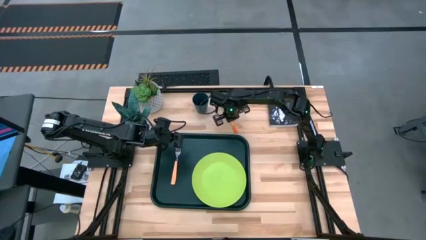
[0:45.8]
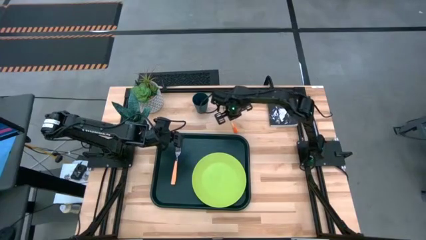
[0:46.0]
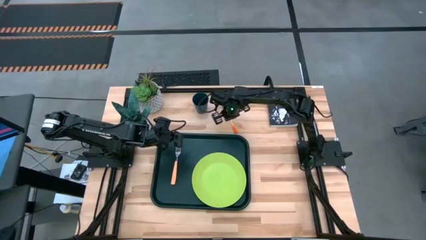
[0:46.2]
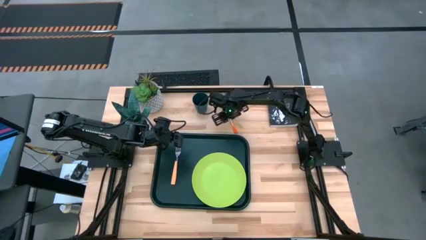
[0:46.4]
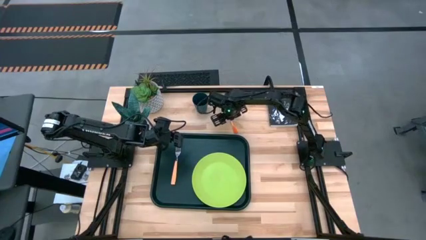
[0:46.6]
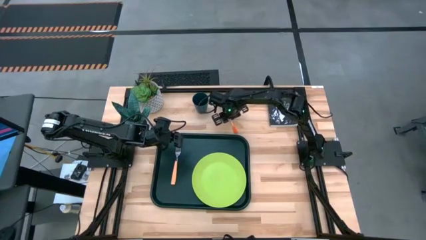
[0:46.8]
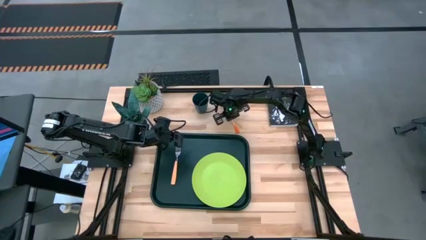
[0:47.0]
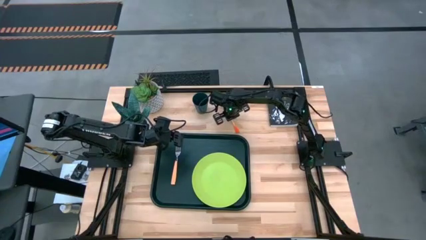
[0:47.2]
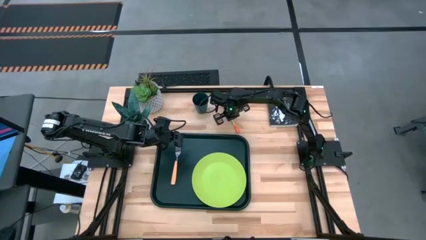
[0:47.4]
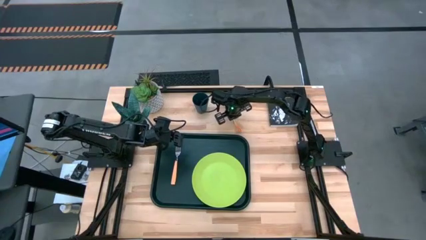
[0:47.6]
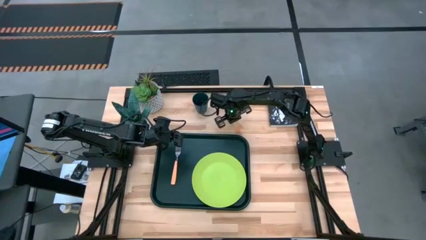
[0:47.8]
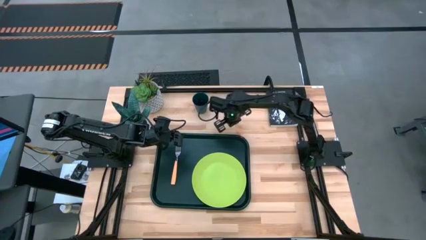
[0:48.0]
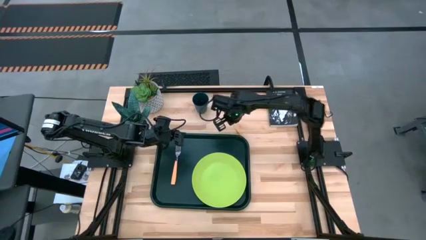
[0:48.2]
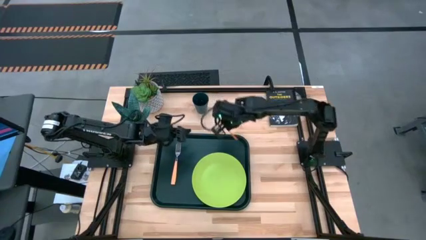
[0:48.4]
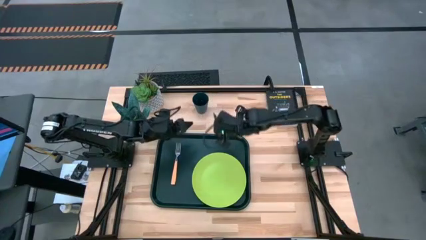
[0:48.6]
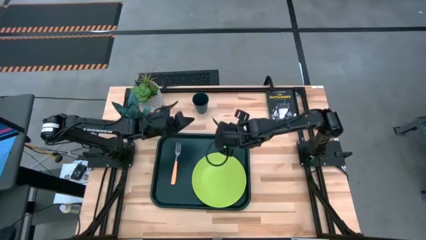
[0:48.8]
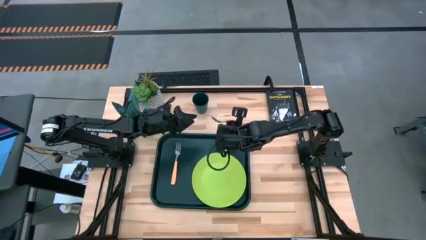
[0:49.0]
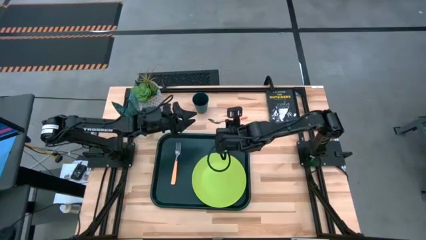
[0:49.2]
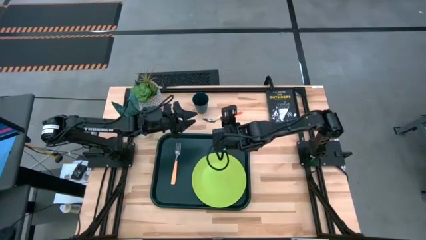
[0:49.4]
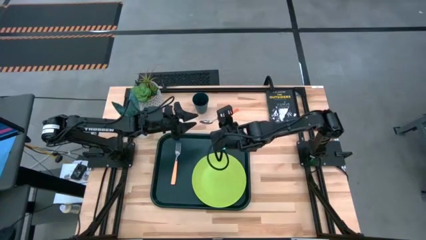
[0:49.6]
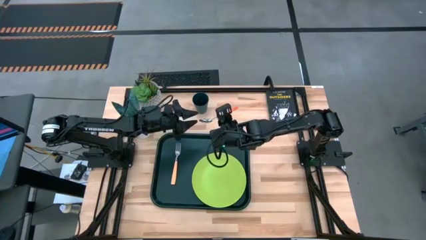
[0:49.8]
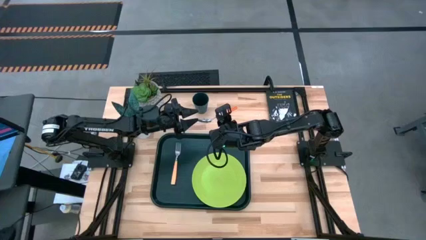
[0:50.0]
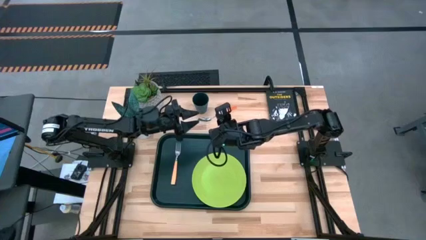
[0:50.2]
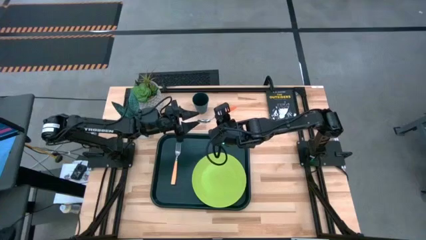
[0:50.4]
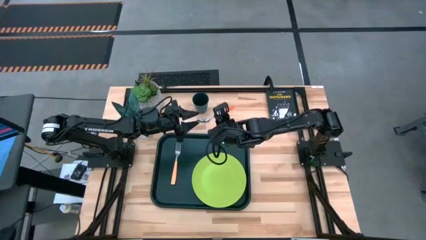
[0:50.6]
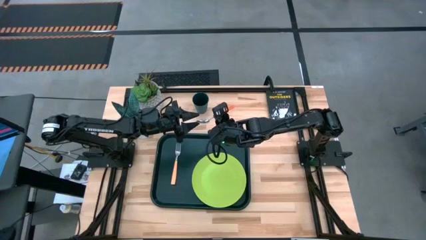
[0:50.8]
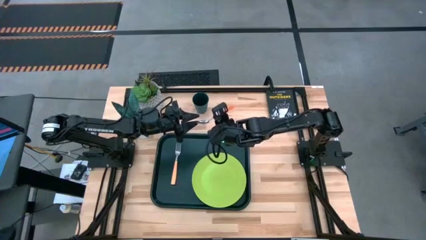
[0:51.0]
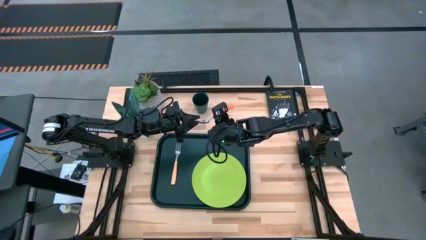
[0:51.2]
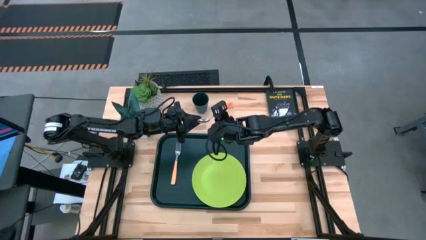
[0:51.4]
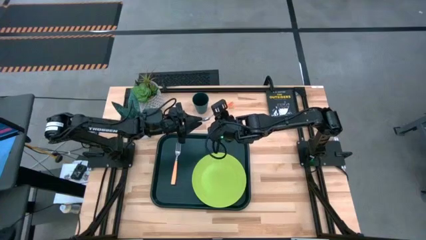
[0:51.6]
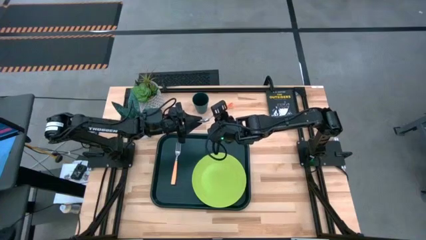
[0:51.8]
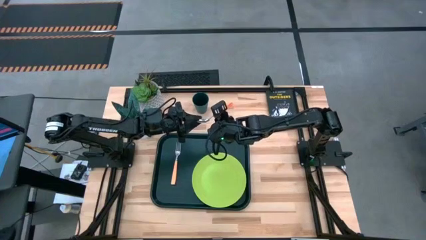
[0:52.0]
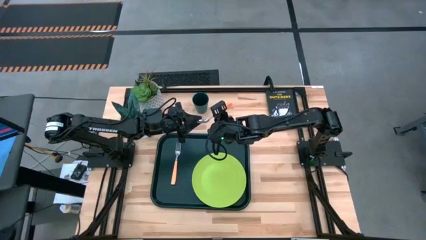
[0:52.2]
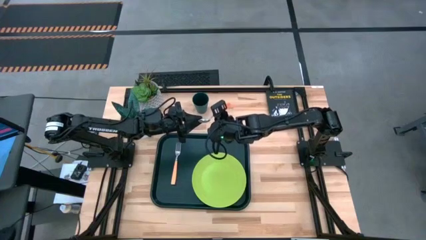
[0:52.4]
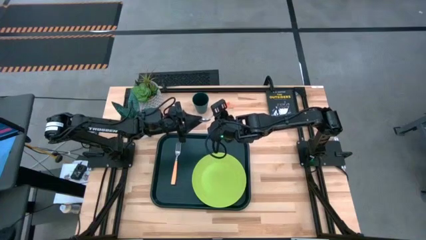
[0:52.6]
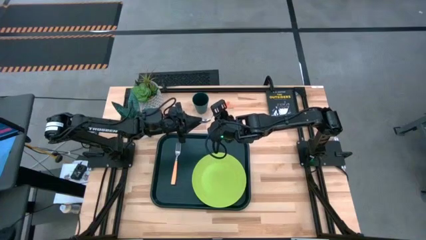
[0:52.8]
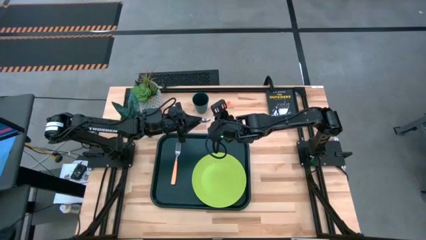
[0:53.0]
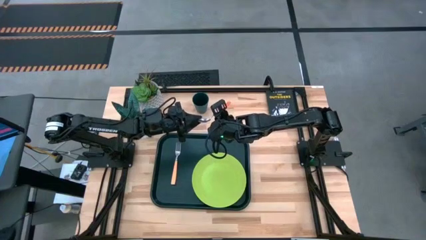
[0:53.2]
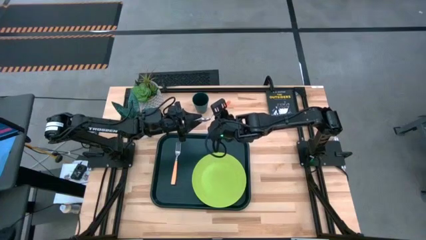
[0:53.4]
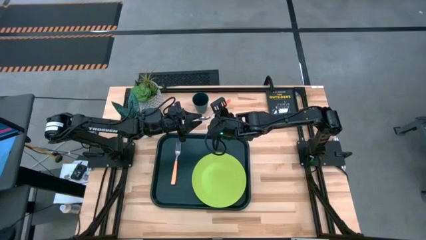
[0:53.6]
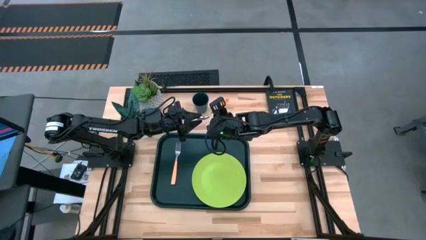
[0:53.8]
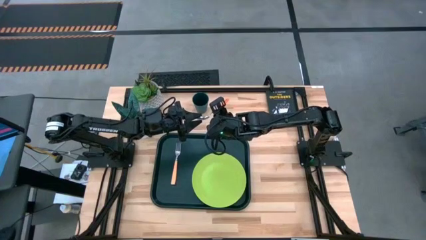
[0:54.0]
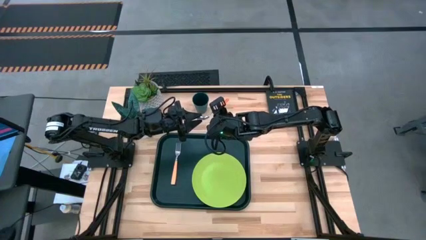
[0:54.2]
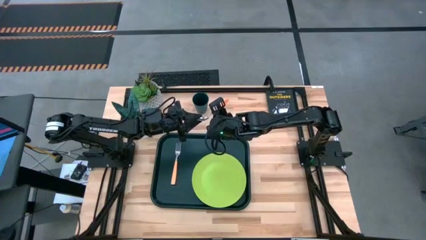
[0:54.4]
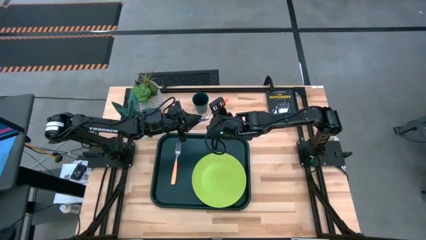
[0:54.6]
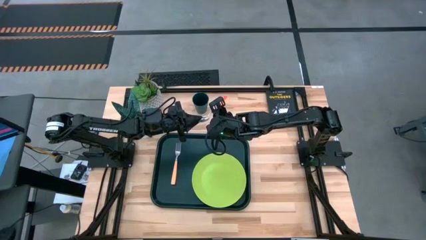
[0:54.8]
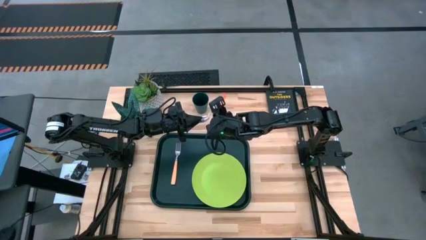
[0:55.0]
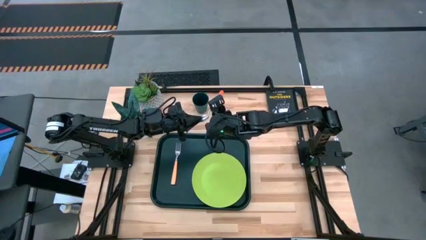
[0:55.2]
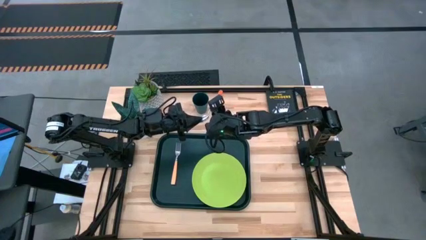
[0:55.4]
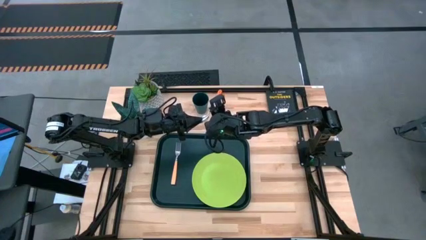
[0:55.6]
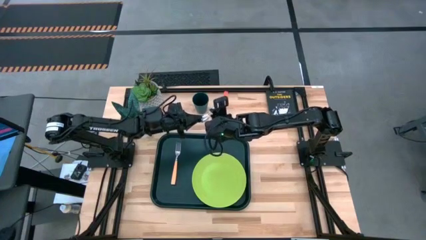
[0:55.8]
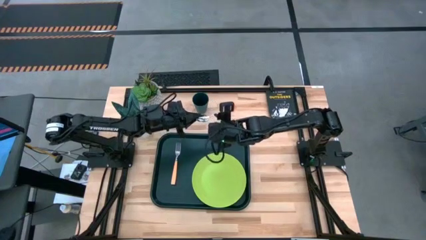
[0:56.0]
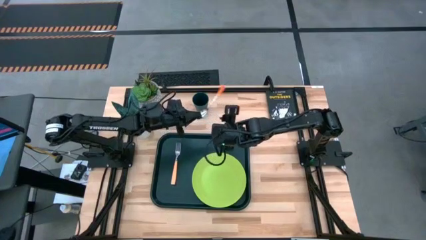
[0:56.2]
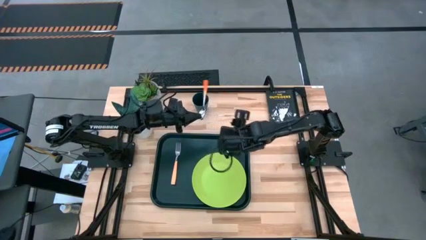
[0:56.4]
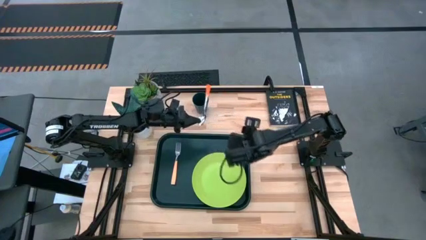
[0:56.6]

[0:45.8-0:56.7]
Task: Pick and place plate/cup/fork/spoon on tray
Put the orange spoon on the black tray to the left of the green plate
